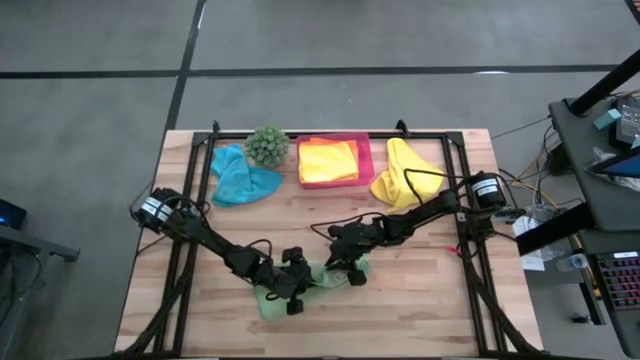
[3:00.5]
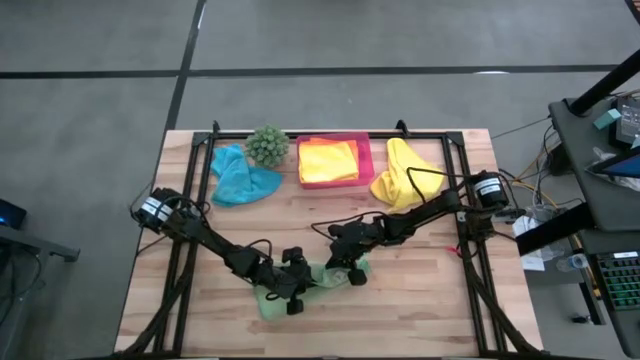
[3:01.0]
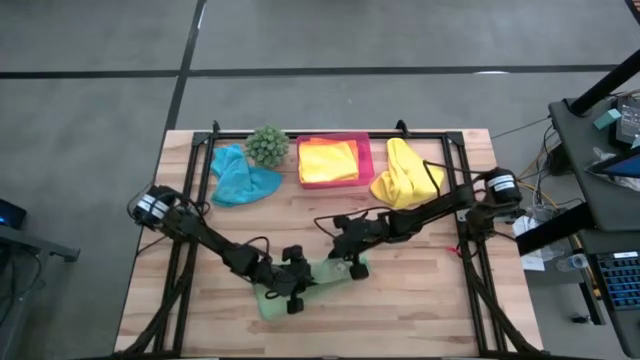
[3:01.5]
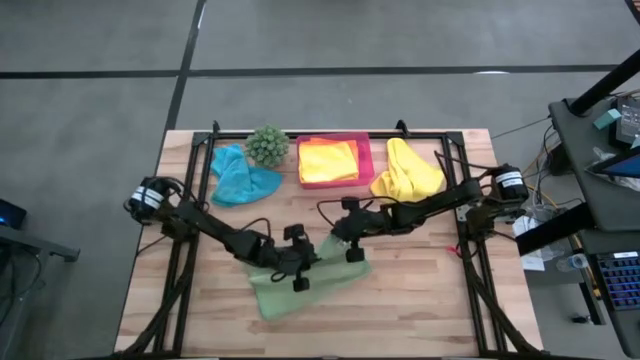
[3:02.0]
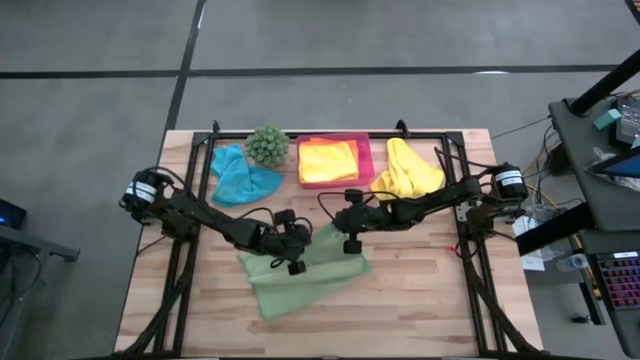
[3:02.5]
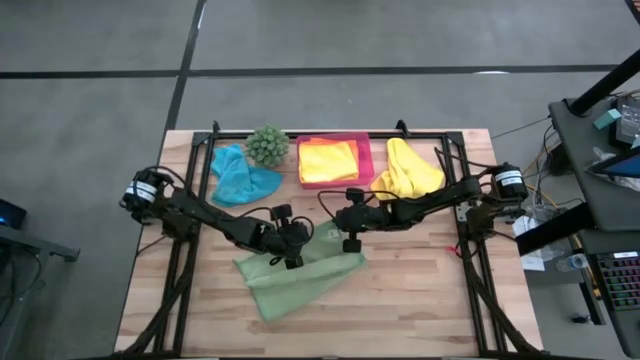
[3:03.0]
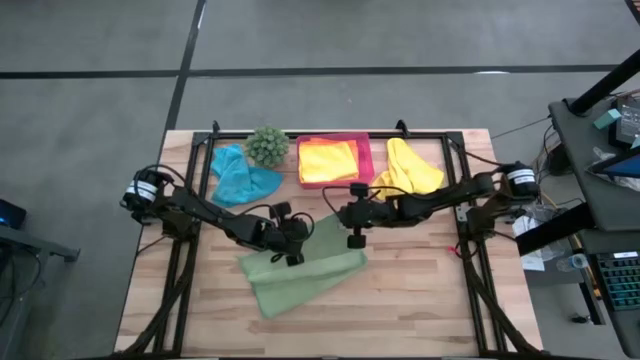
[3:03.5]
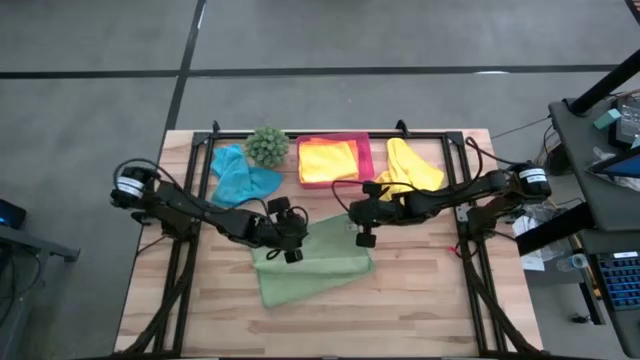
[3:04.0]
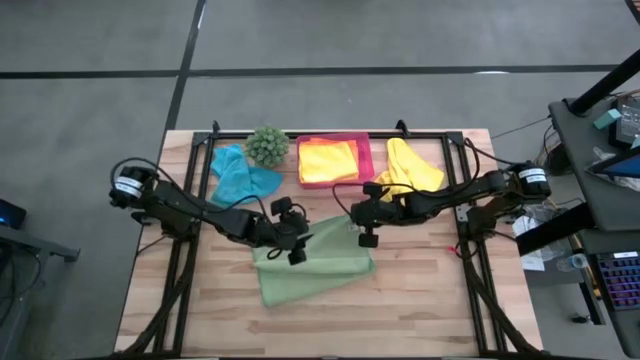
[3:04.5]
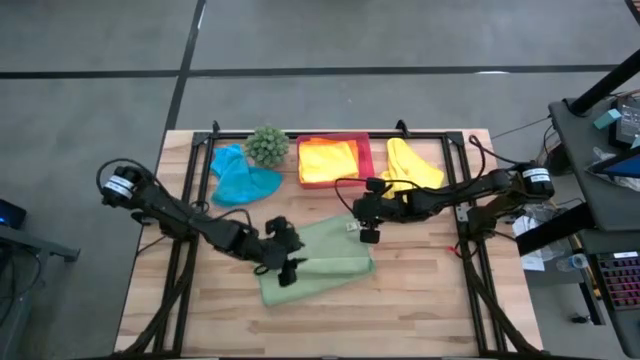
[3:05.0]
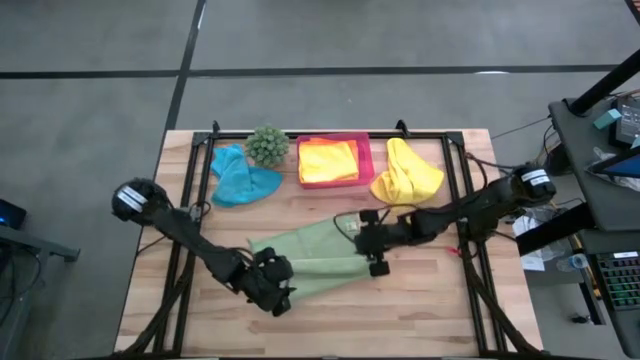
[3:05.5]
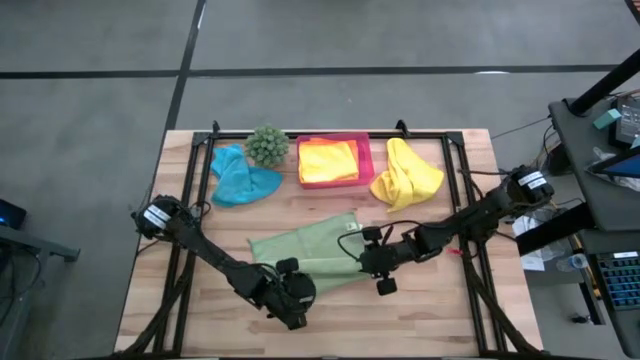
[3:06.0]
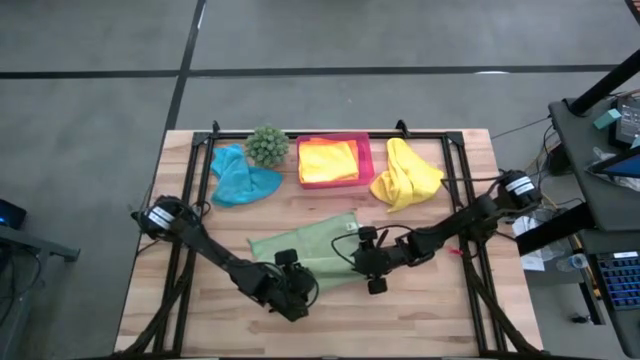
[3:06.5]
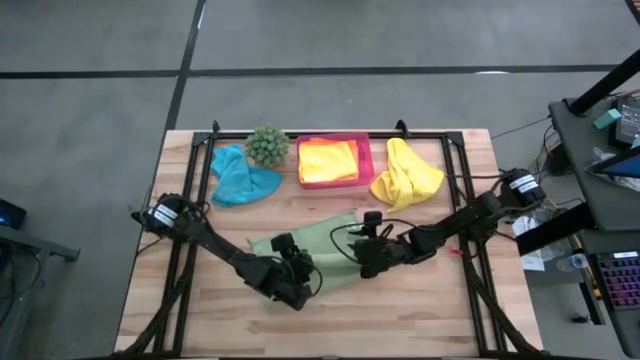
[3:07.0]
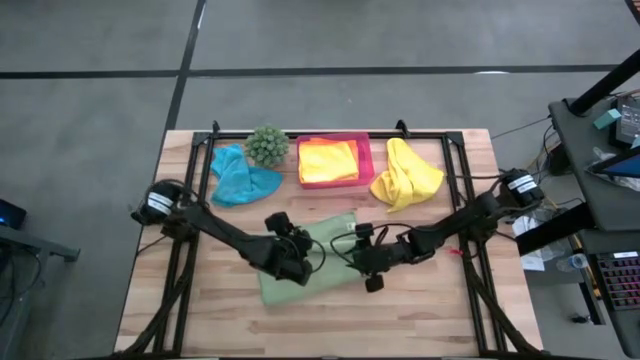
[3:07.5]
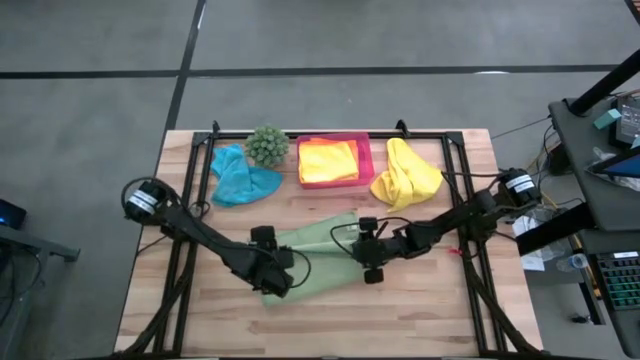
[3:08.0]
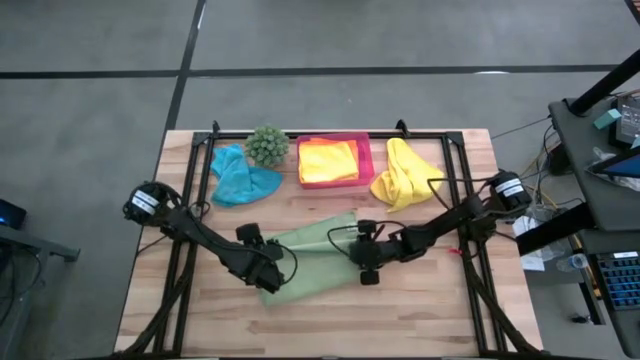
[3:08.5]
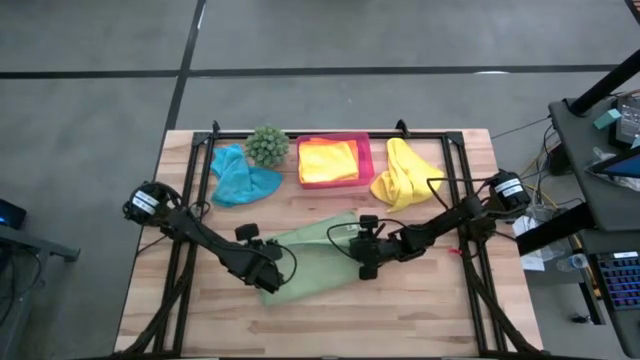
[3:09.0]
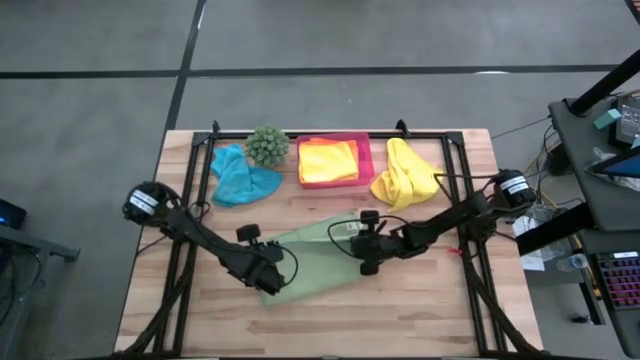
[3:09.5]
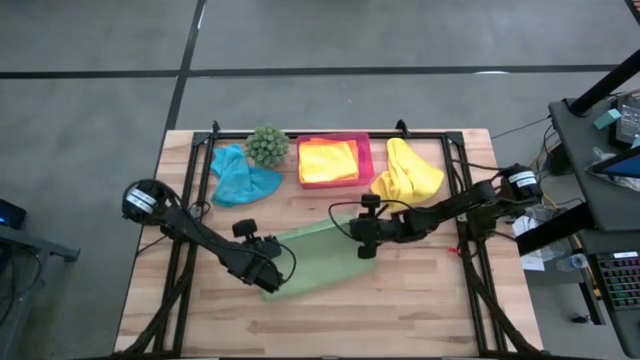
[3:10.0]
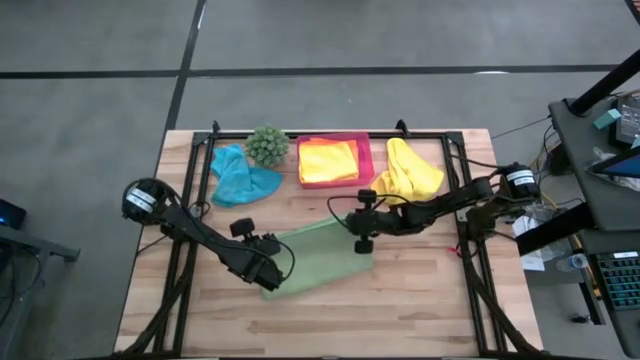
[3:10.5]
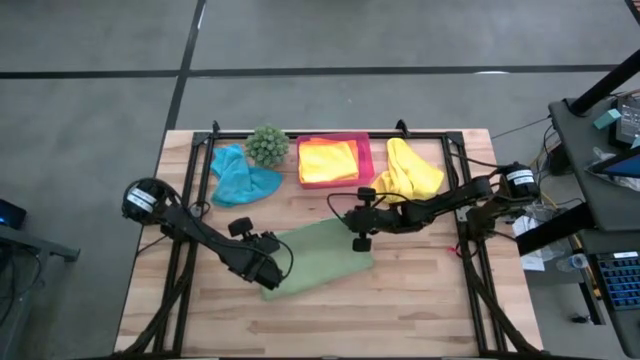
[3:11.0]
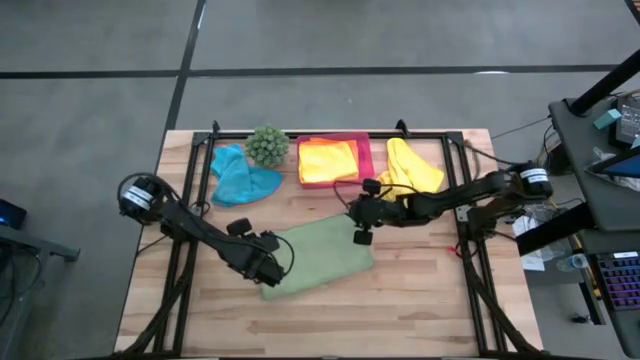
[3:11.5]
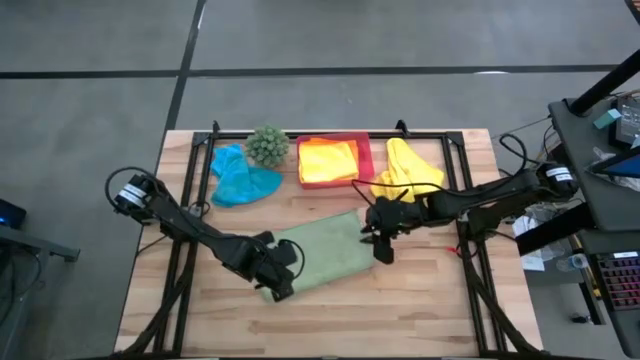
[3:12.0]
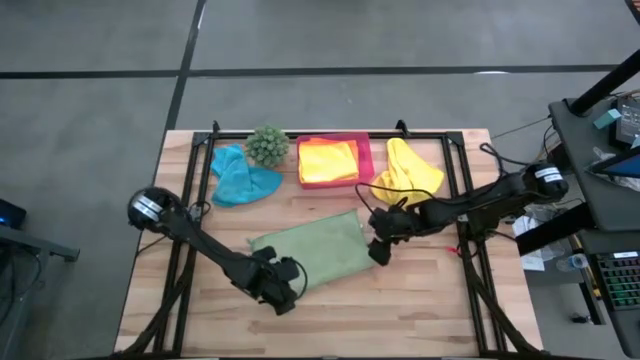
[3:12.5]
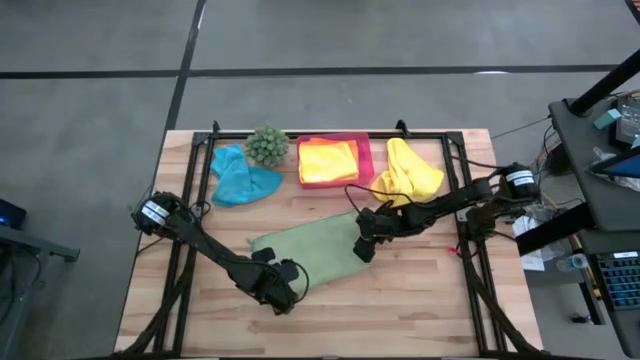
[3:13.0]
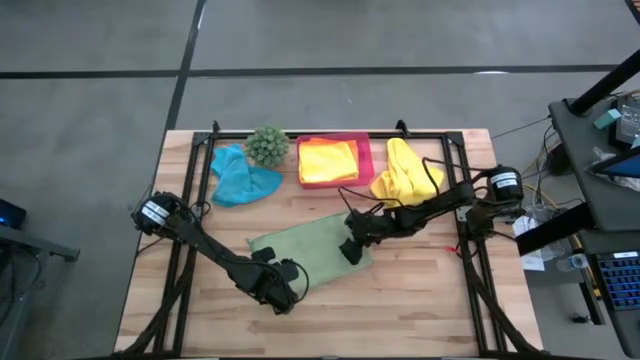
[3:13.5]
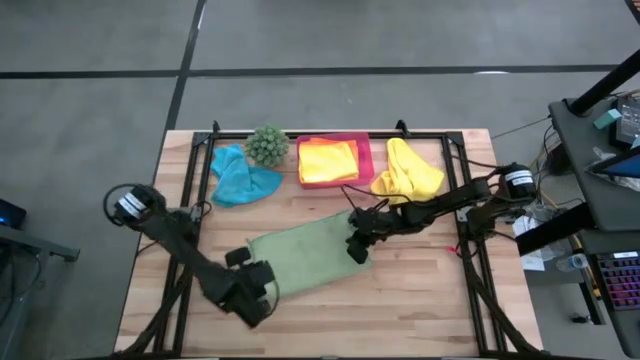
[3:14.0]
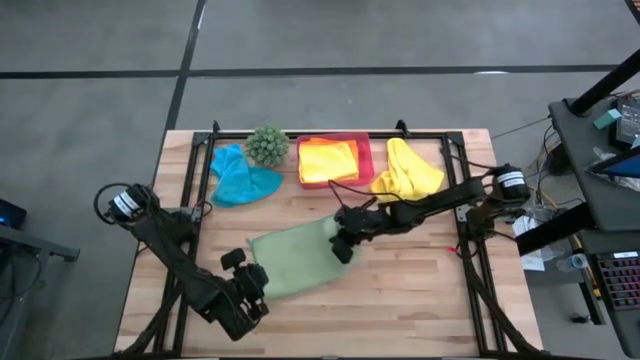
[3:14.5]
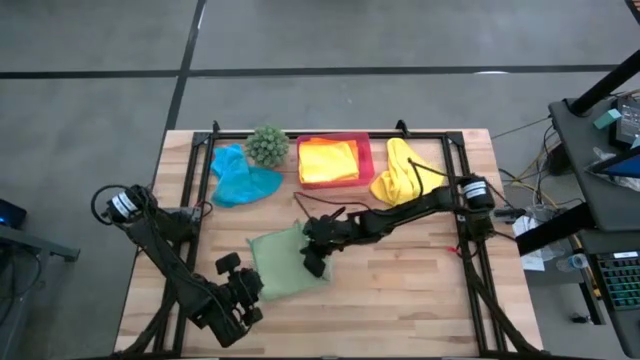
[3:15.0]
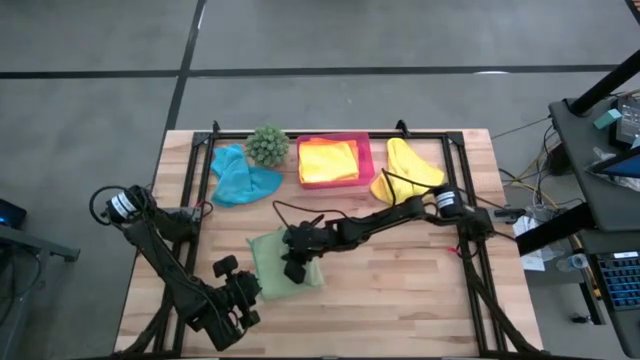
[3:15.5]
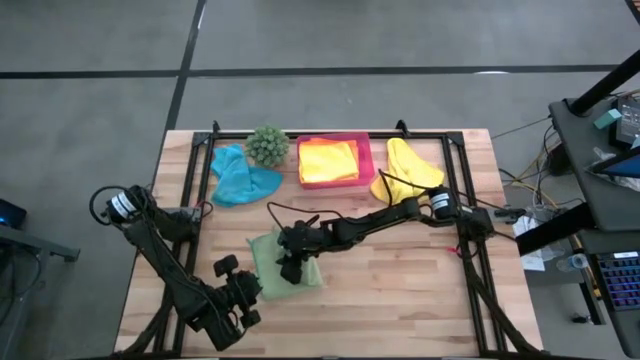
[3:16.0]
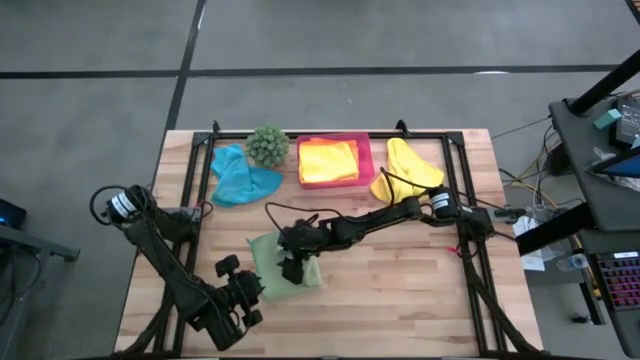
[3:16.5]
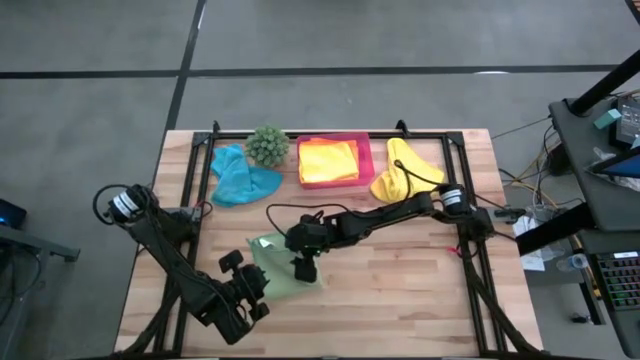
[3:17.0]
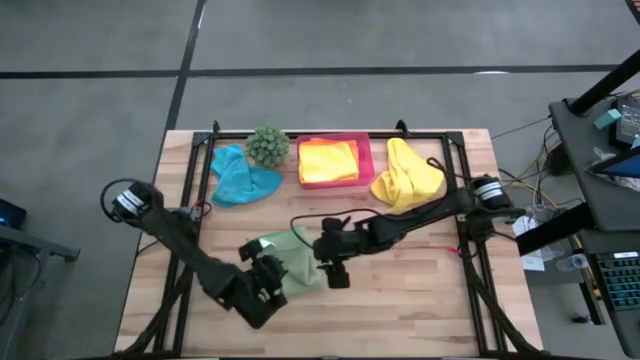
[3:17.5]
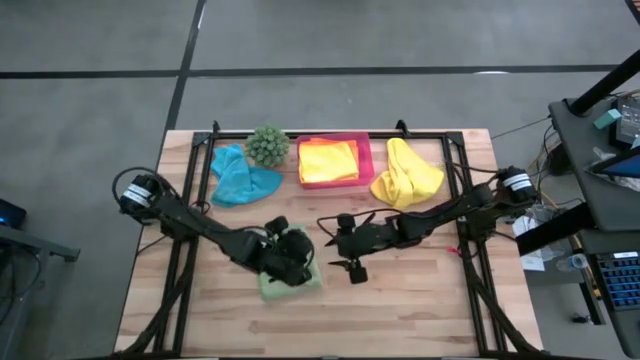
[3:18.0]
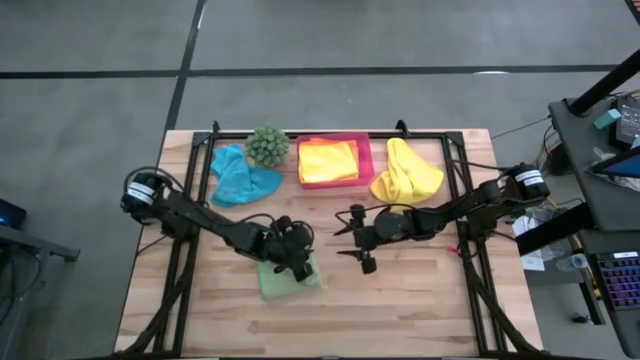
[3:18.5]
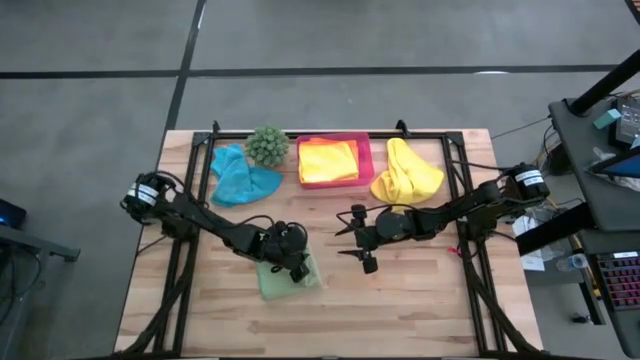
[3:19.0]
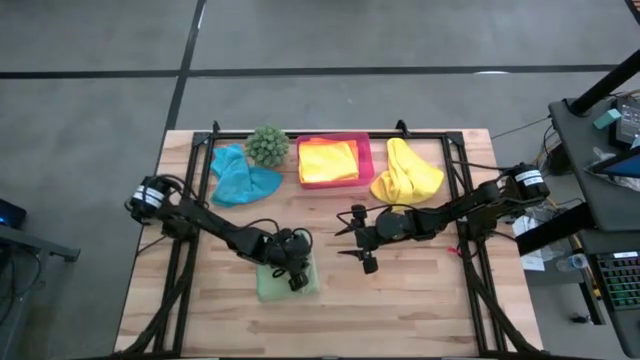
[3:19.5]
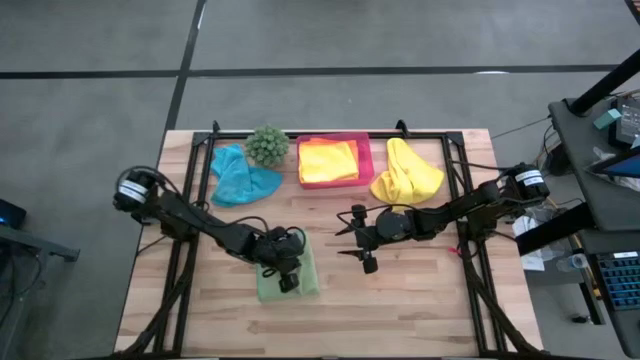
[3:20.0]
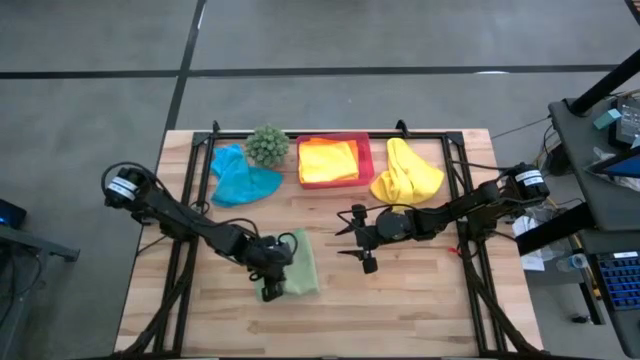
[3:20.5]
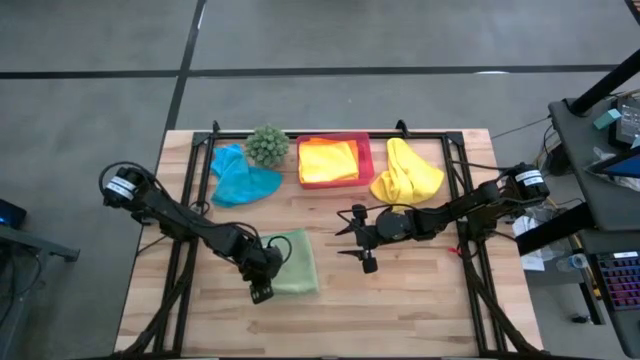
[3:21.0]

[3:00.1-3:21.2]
Task: Fold microfiber towels
Fold the green microfiber towel

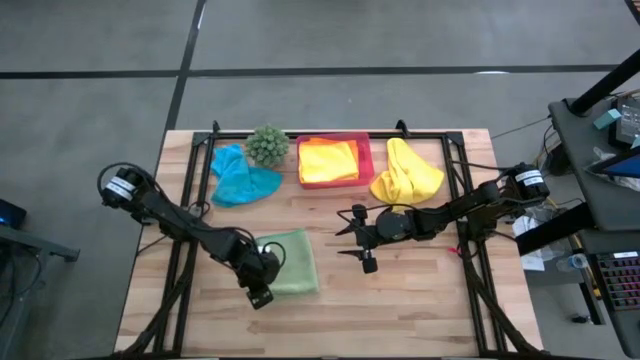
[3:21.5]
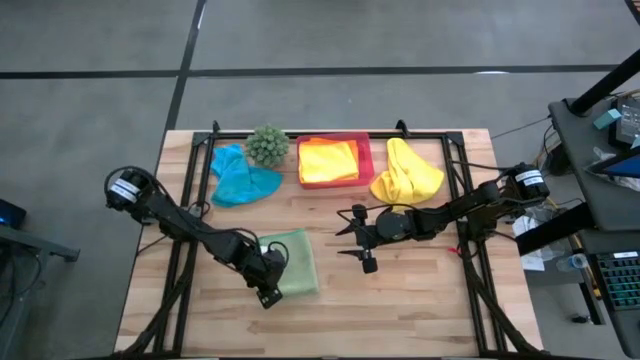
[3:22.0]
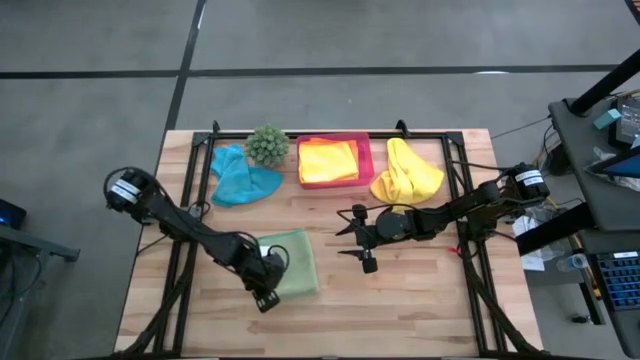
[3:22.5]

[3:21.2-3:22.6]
Fold the green microfiber towel
